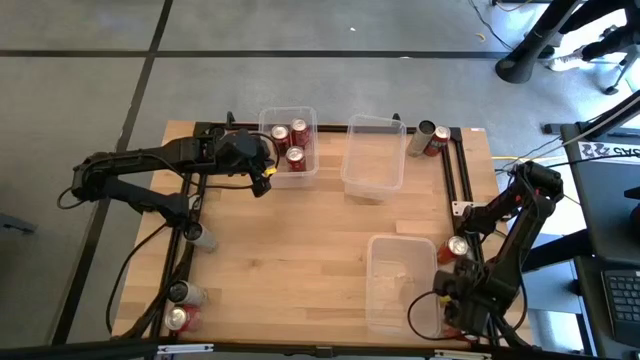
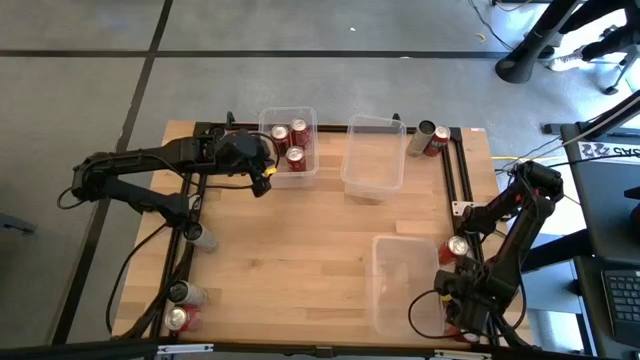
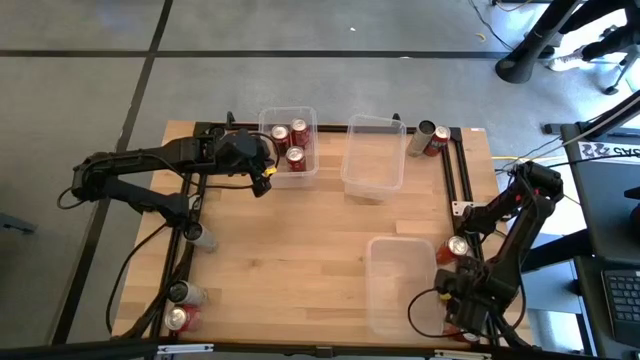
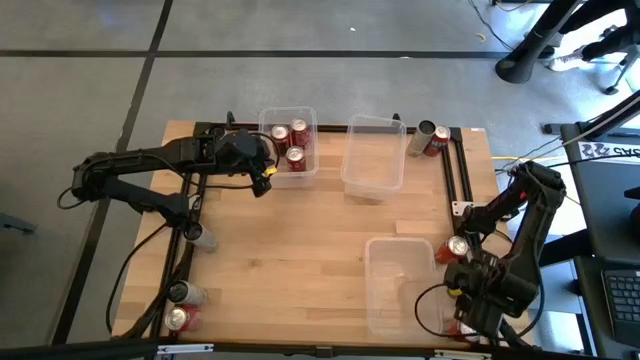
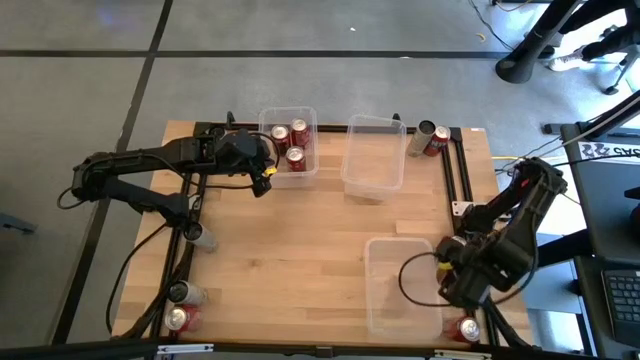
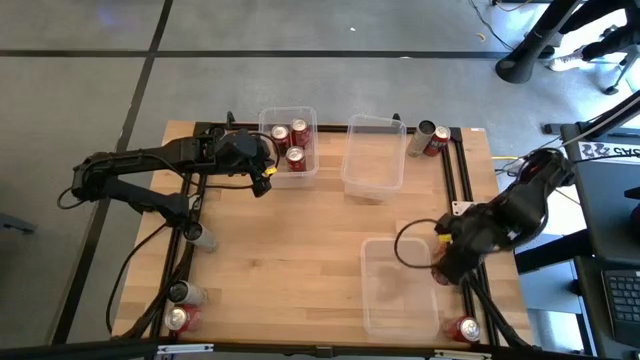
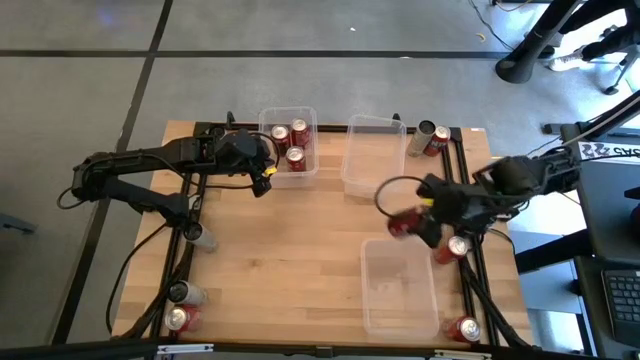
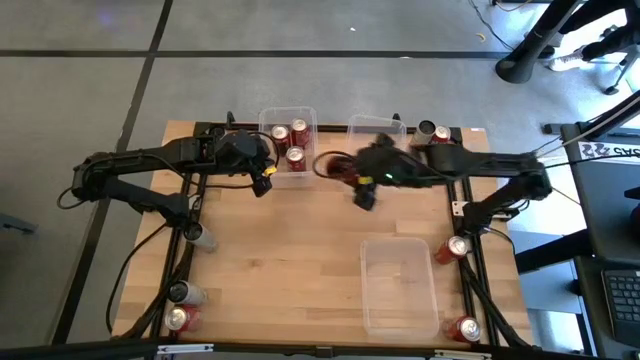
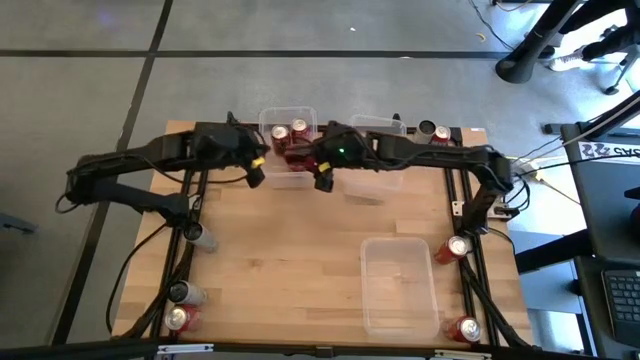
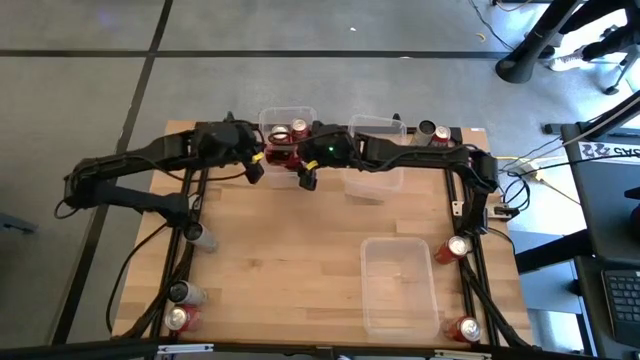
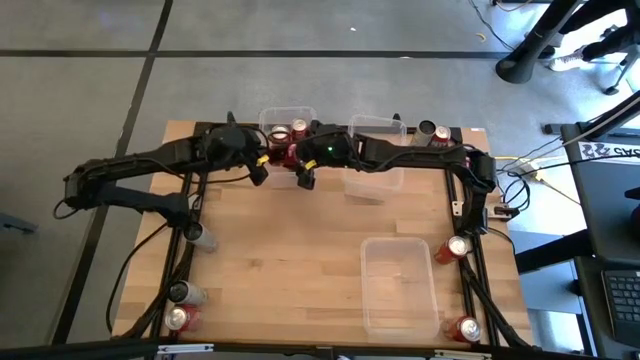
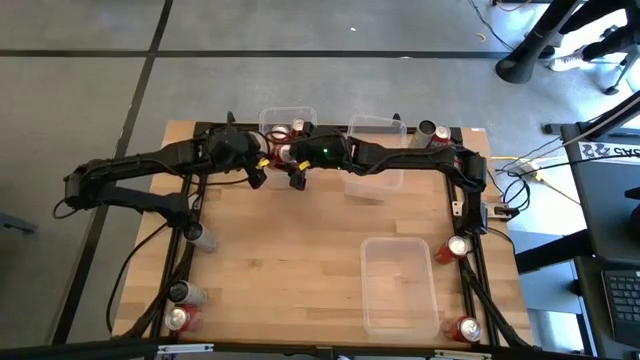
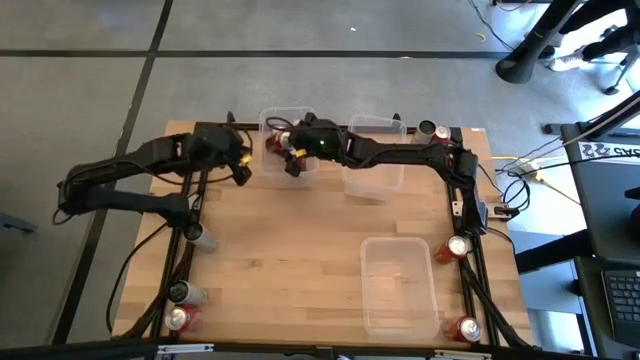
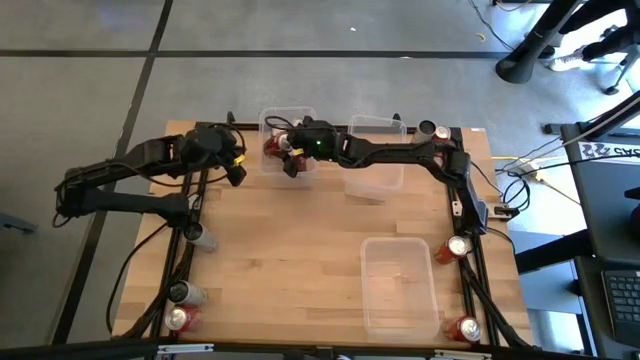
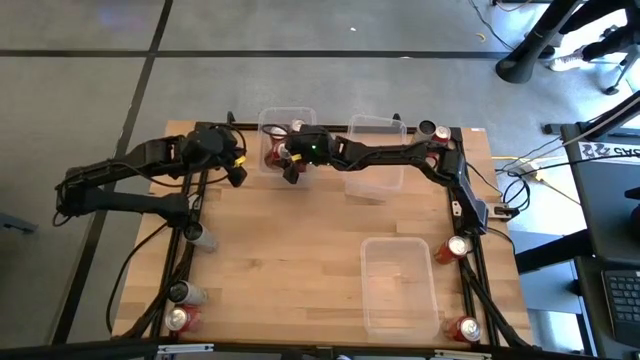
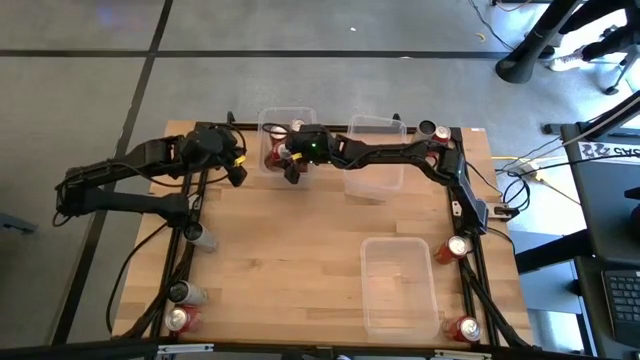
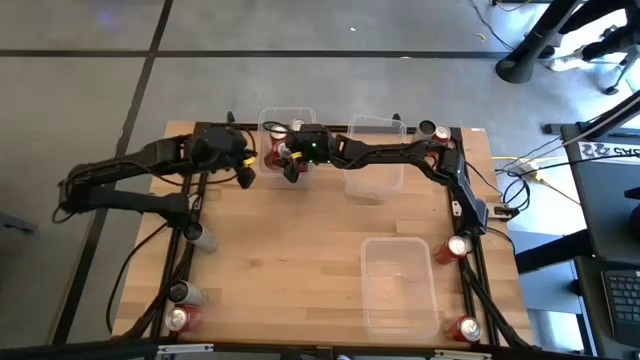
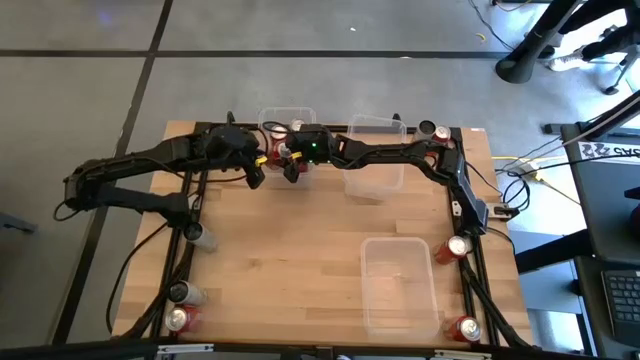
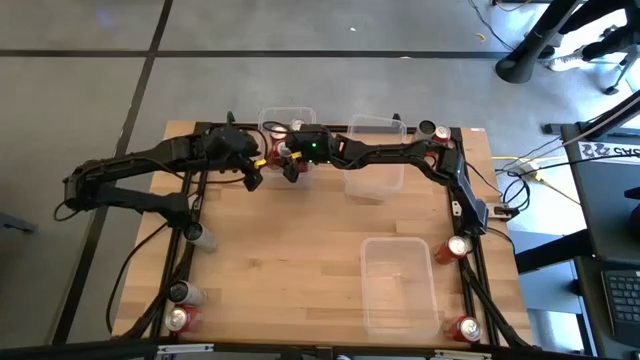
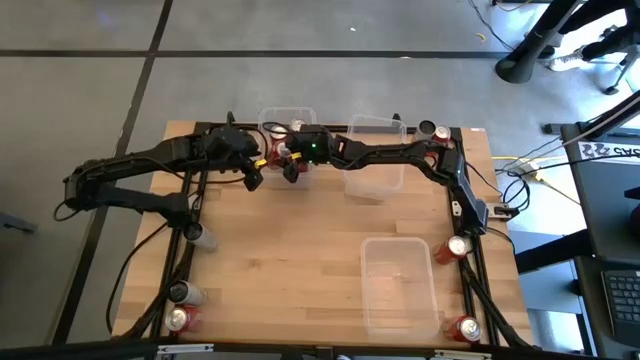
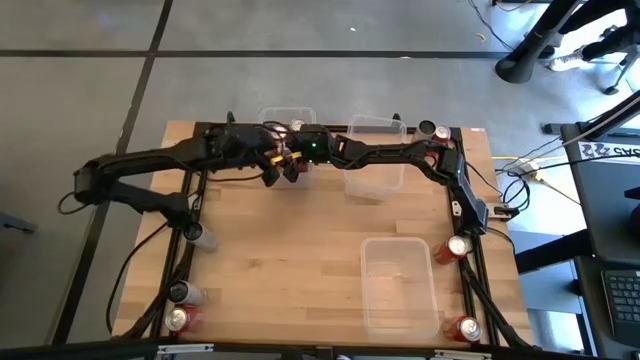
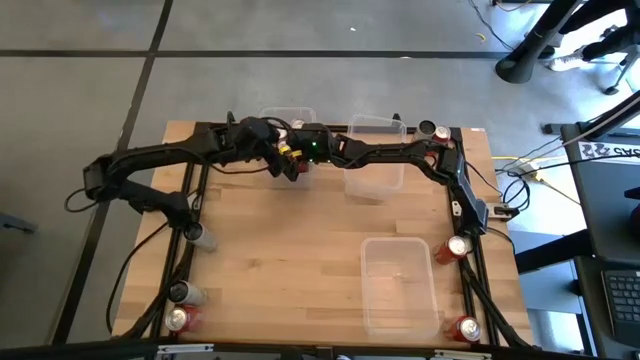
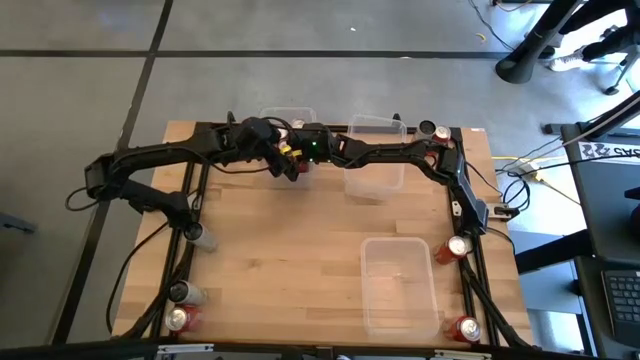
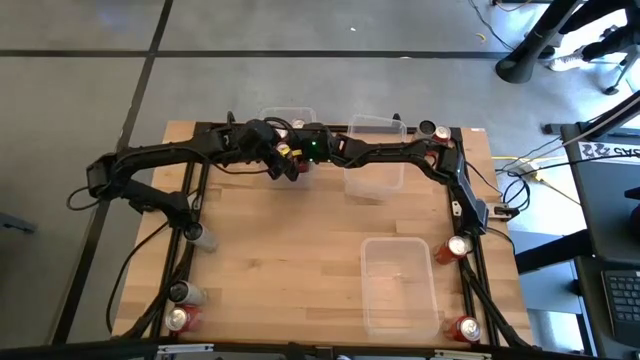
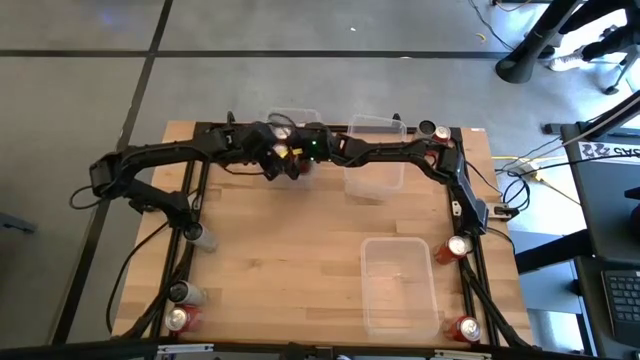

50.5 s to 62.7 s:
Task: Sort soda cans
Put the red soda can into the top left transparent bin aligned with the other red soda cans

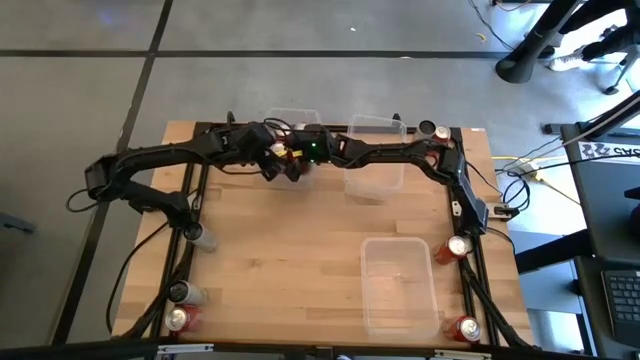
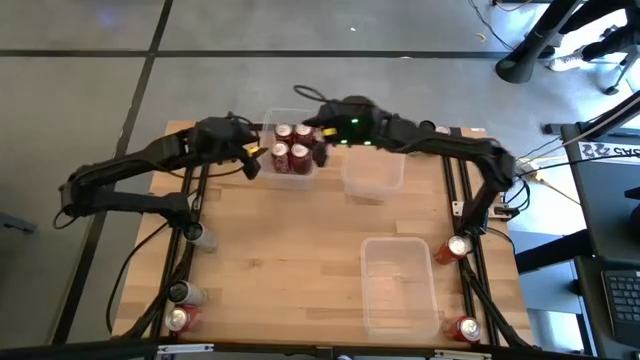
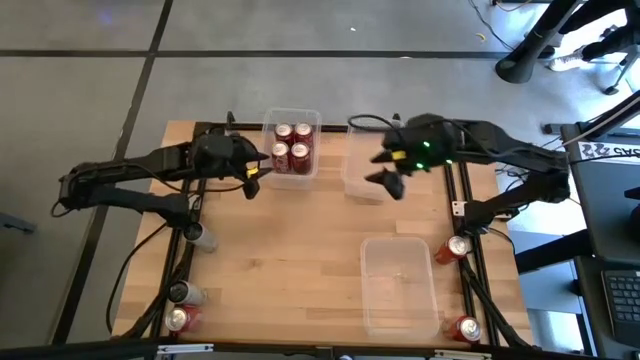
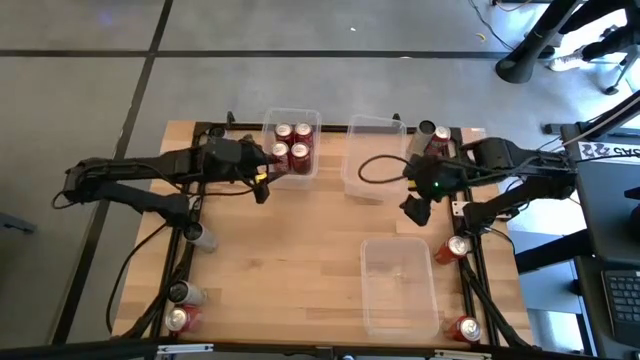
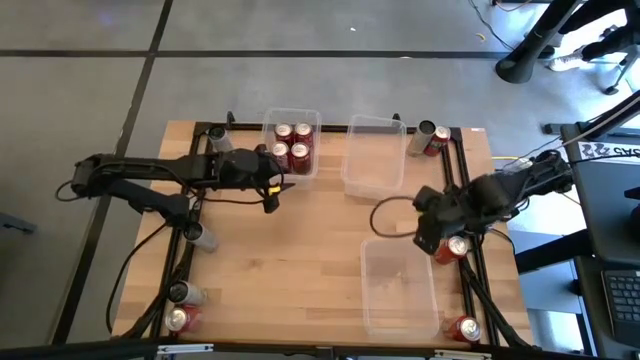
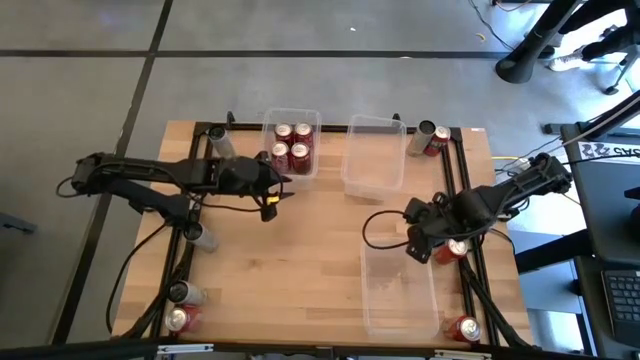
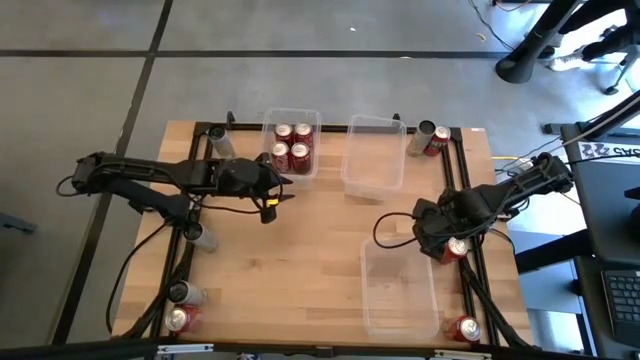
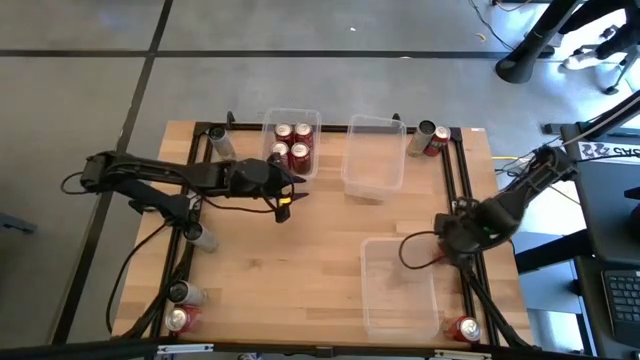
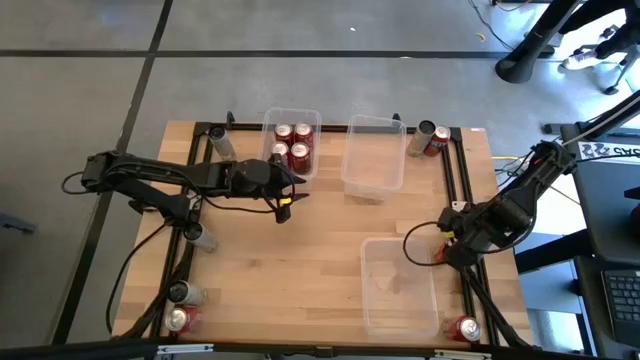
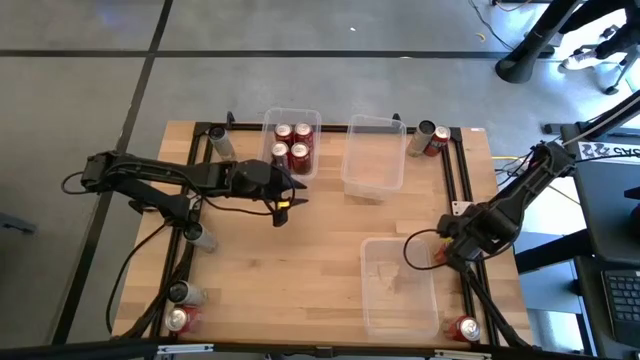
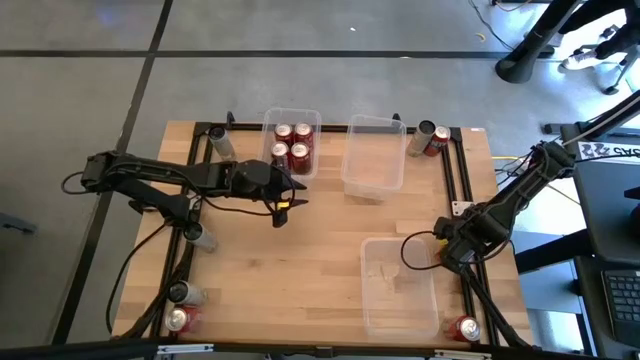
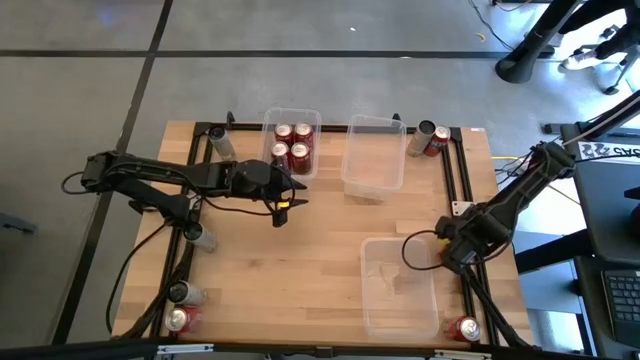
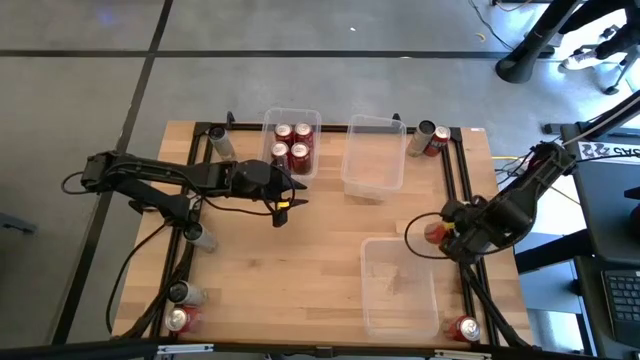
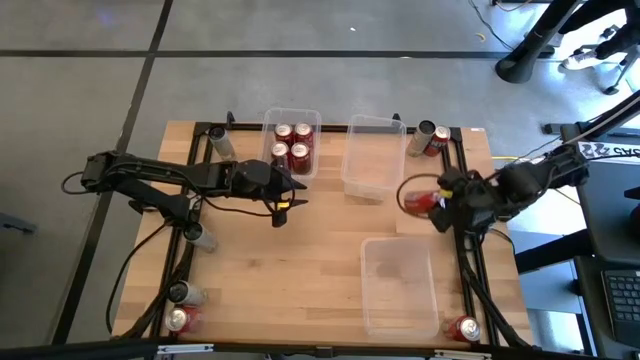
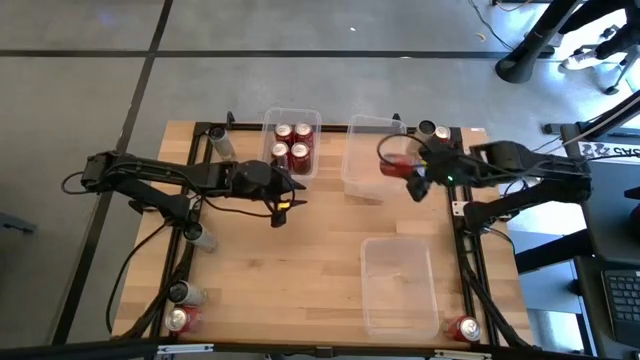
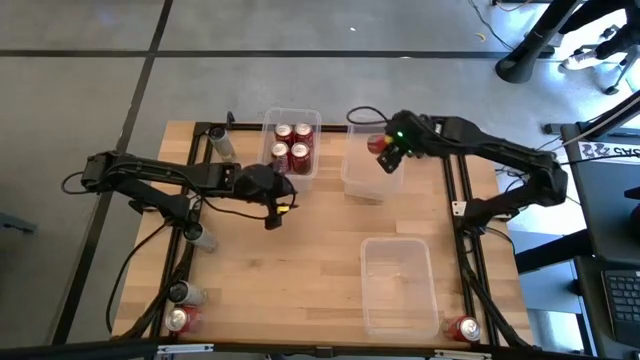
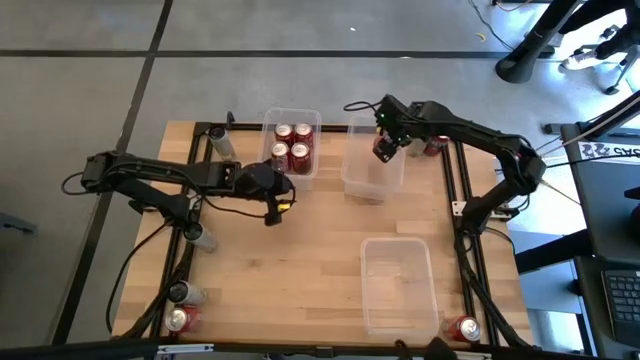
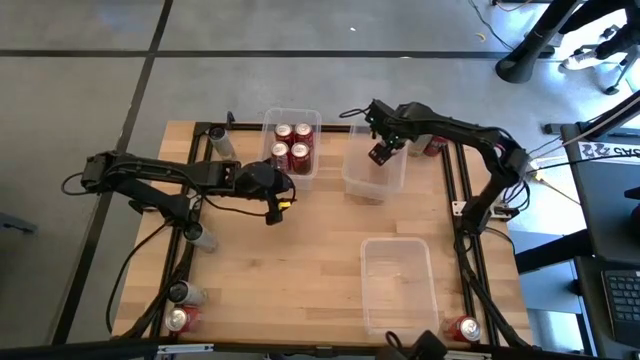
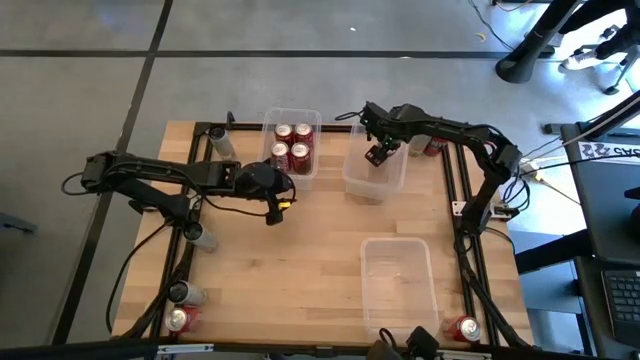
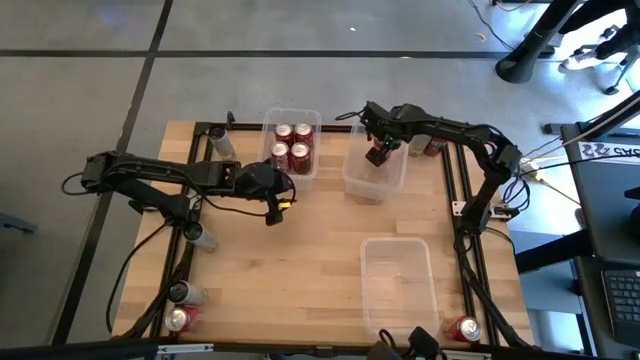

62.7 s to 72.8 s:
Put the middle right orange soda can into the top right transparent bin
